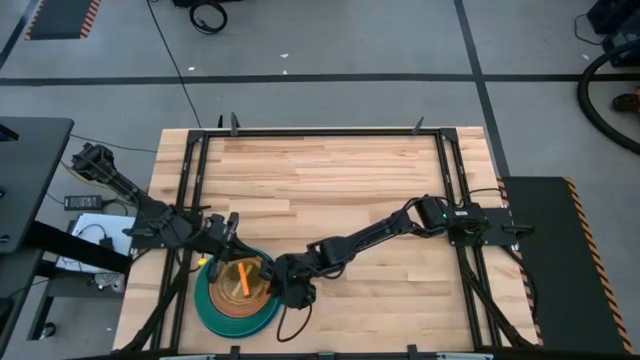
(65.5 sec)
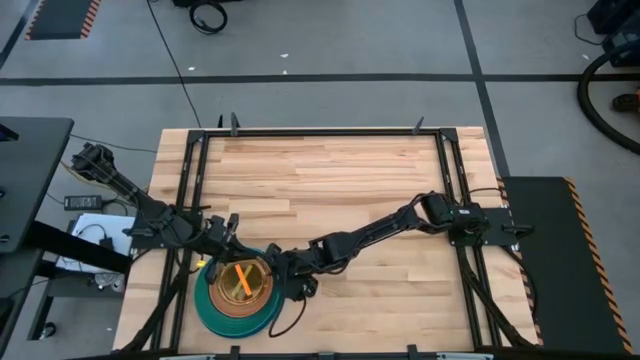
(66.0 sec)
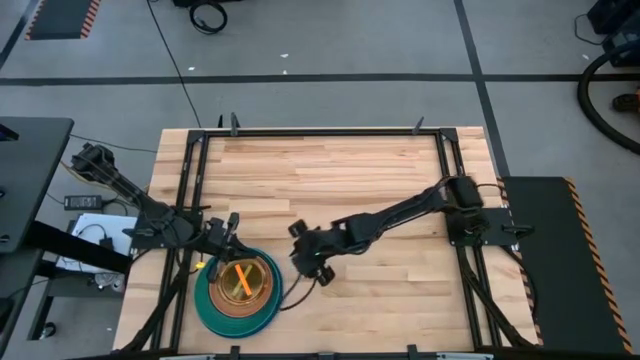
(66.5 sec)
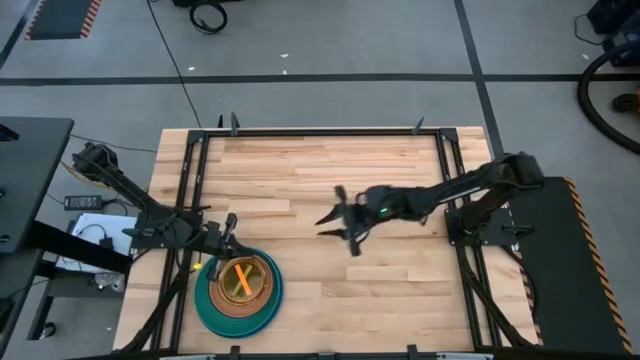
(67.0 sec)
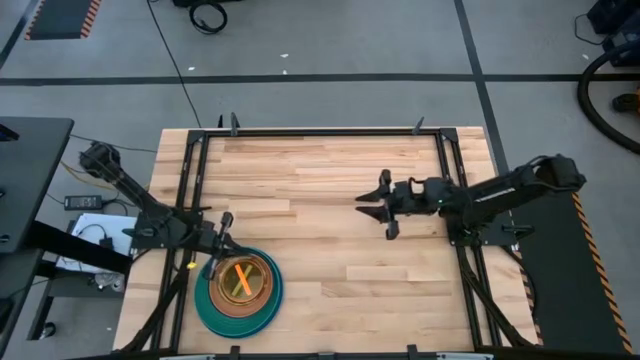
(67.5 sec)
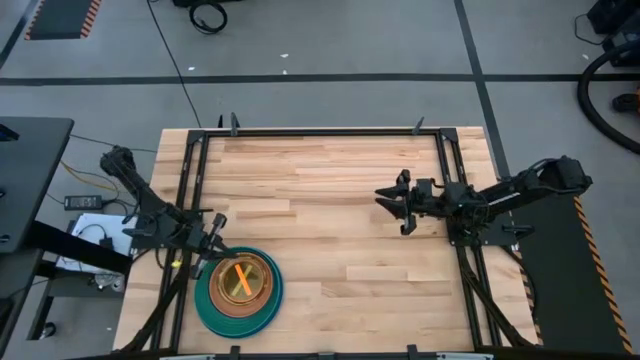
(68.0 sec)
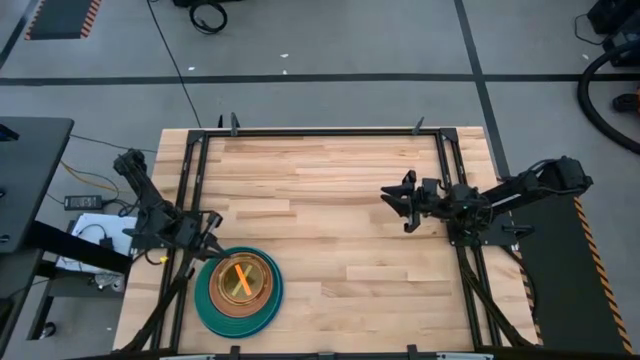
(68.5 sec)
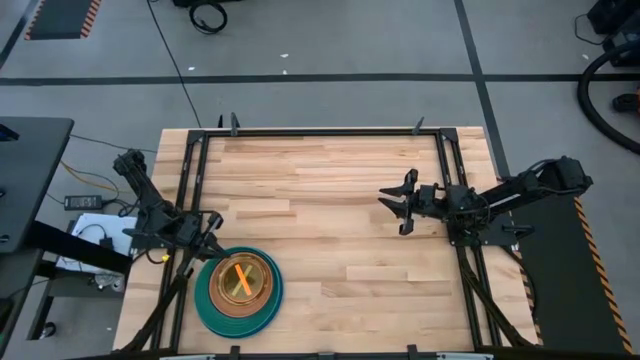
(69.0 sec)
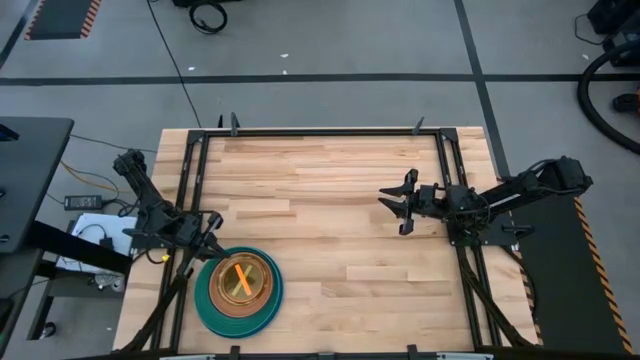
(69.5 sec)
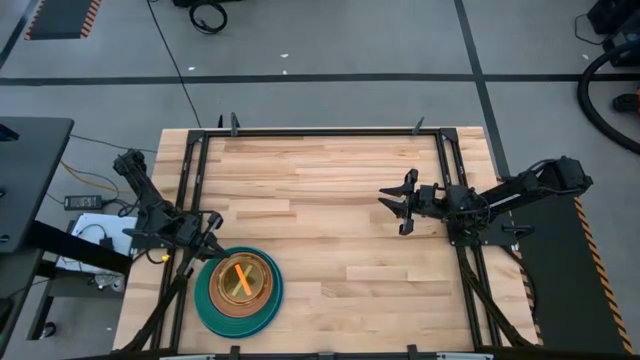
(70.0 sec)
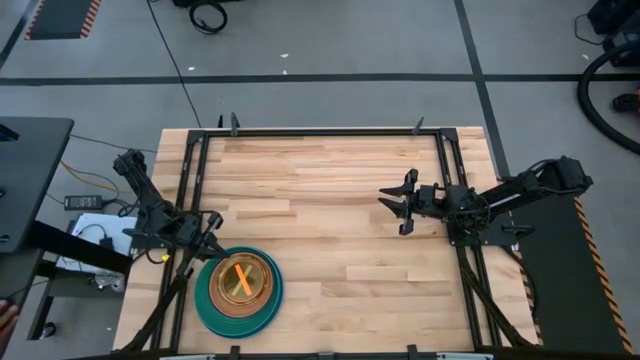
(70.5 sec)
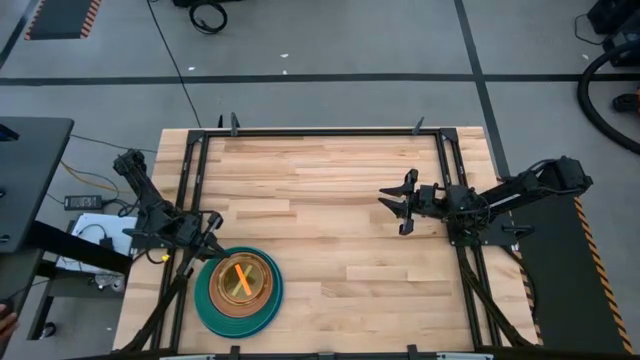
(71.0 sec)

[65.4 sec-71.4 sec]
Task: Stack plastic plates
Return to Home Position

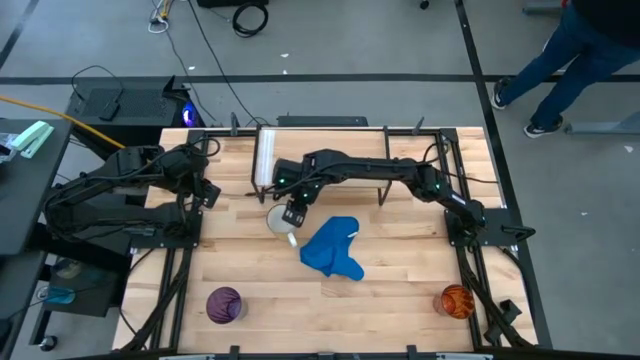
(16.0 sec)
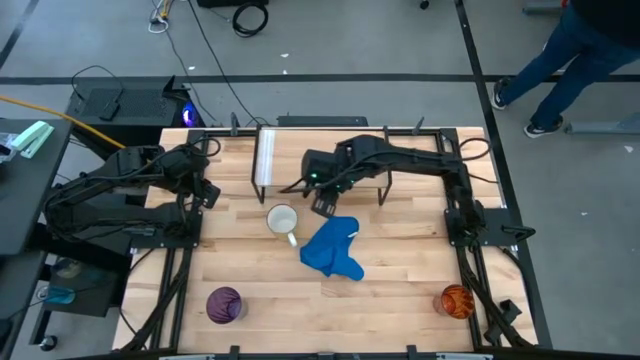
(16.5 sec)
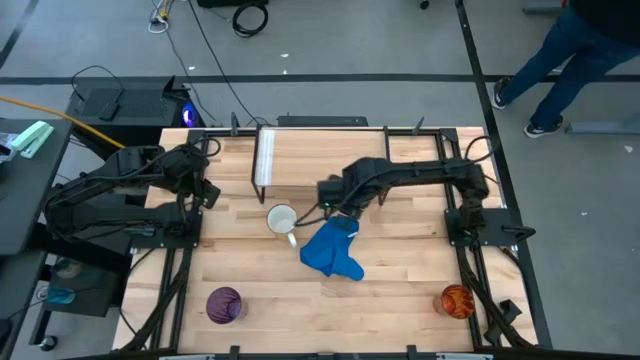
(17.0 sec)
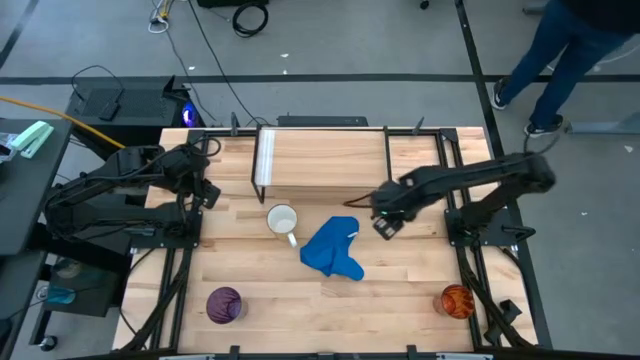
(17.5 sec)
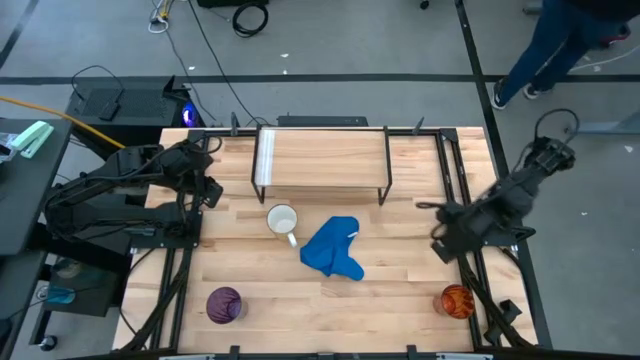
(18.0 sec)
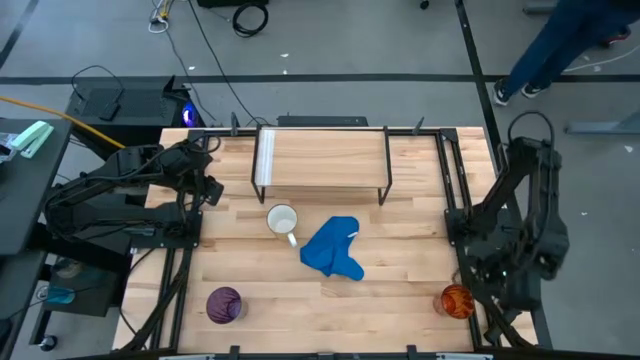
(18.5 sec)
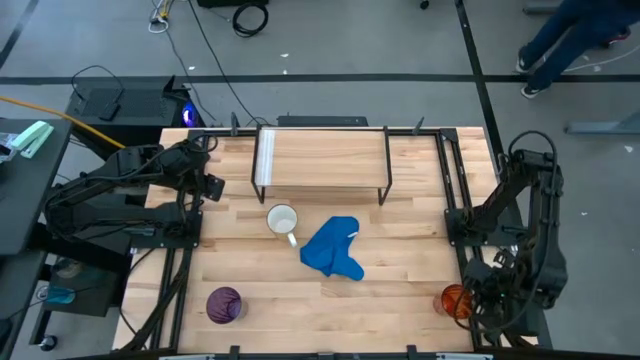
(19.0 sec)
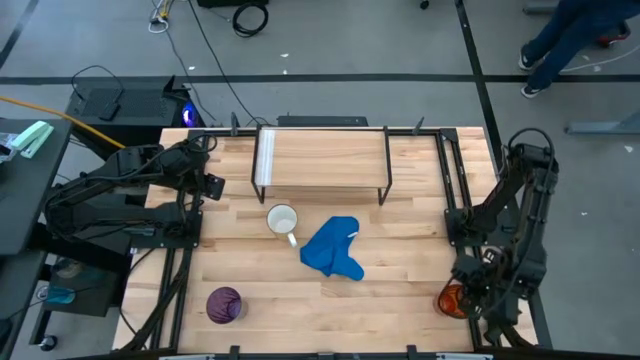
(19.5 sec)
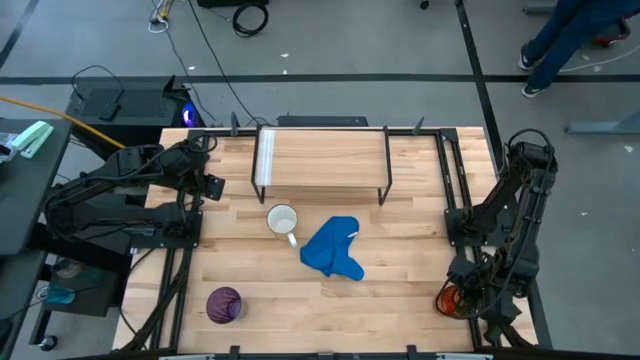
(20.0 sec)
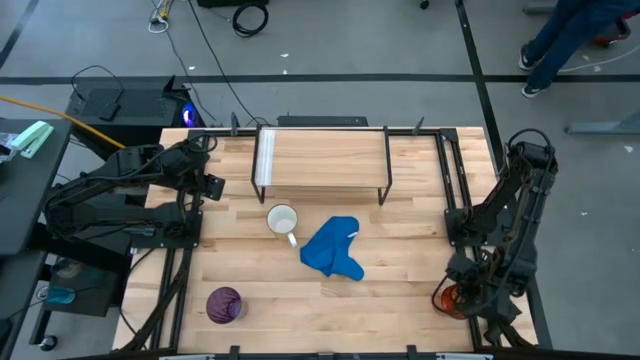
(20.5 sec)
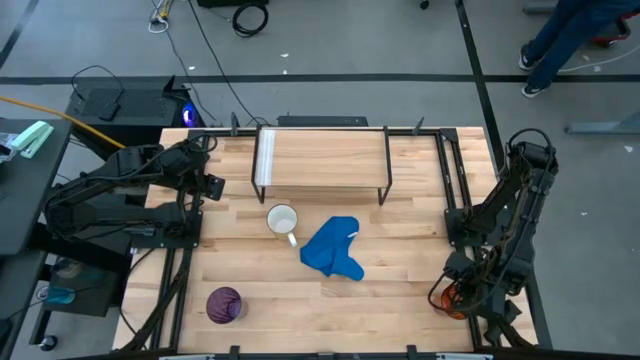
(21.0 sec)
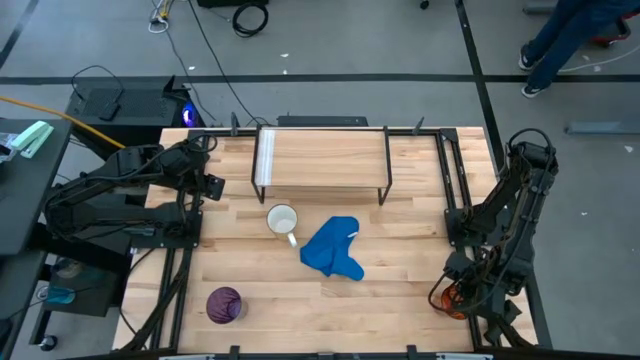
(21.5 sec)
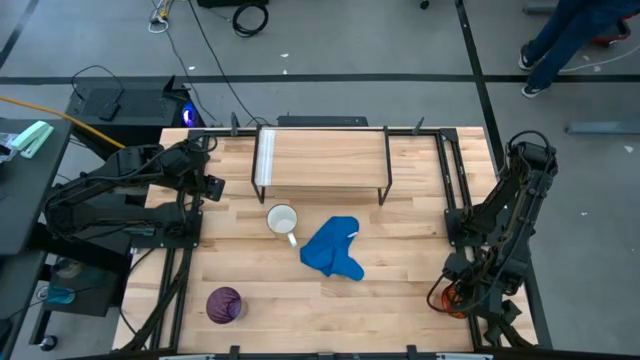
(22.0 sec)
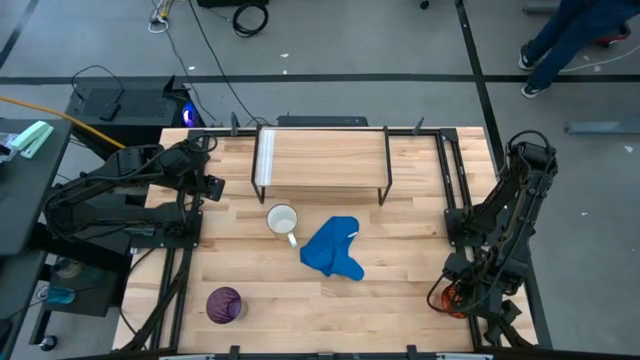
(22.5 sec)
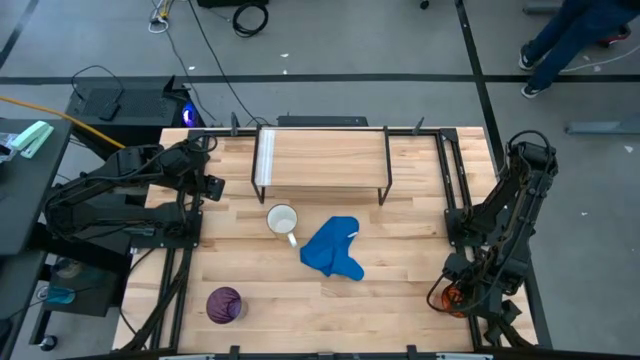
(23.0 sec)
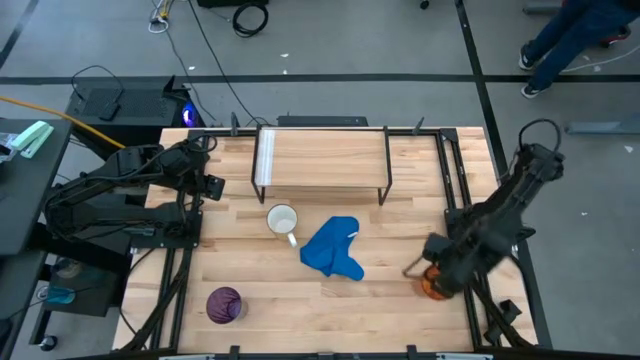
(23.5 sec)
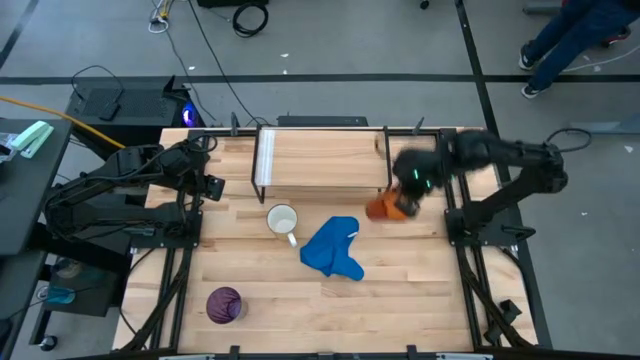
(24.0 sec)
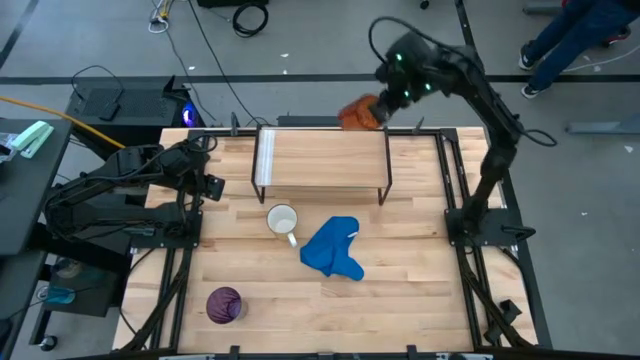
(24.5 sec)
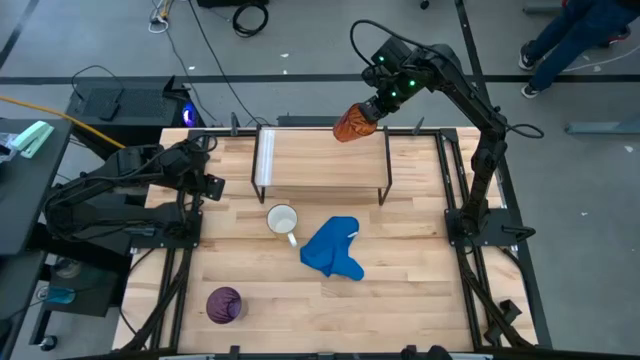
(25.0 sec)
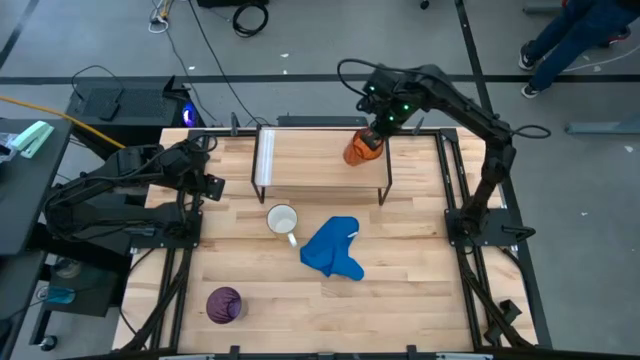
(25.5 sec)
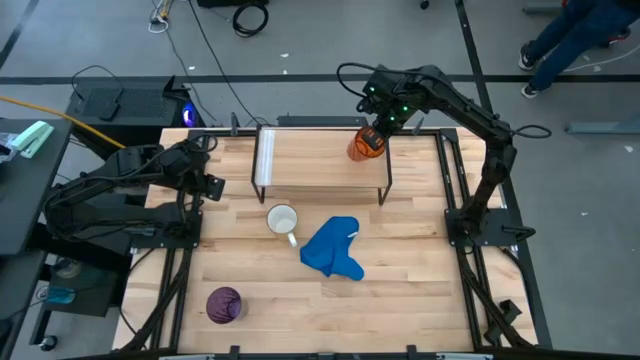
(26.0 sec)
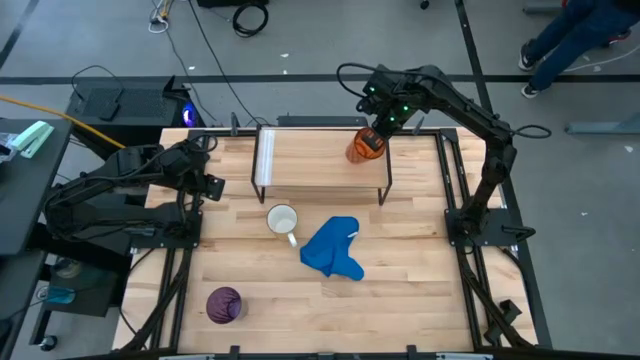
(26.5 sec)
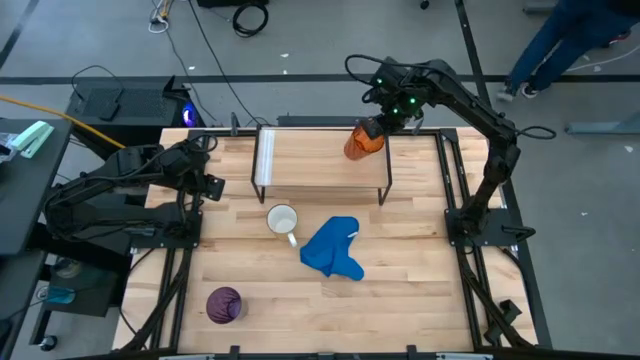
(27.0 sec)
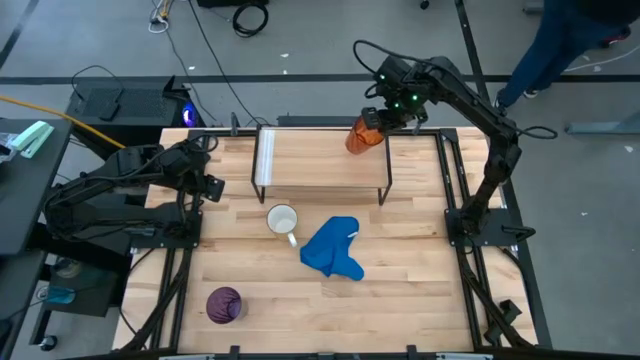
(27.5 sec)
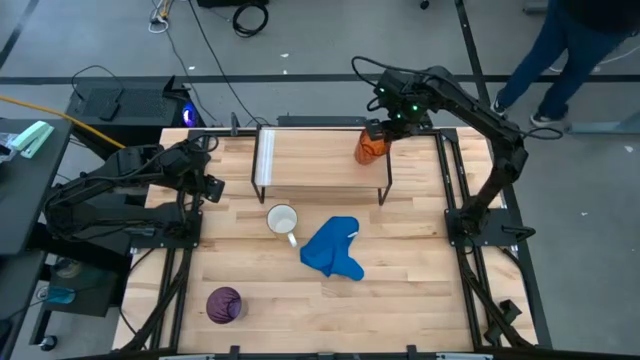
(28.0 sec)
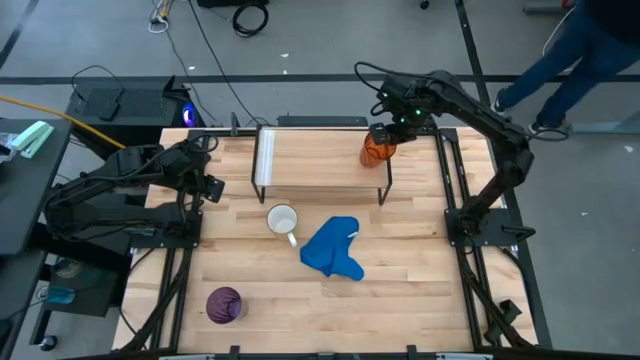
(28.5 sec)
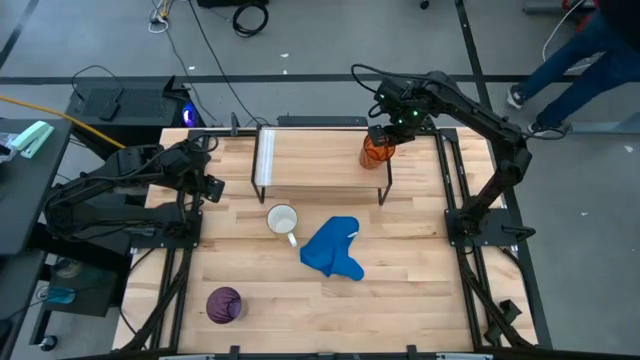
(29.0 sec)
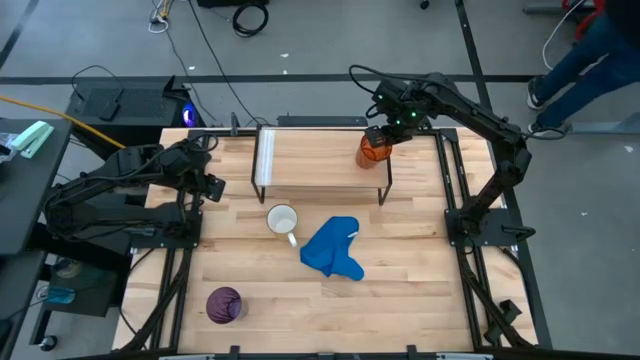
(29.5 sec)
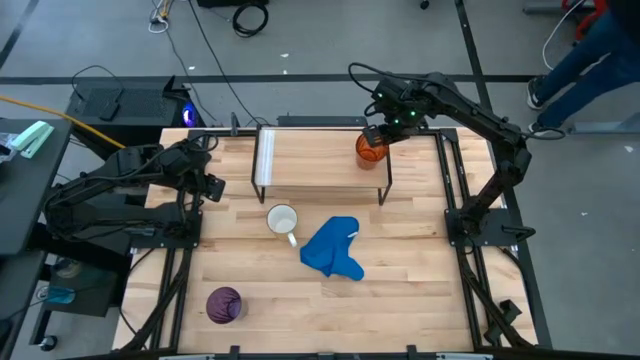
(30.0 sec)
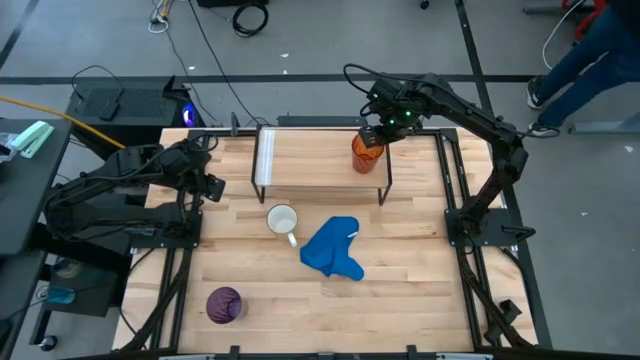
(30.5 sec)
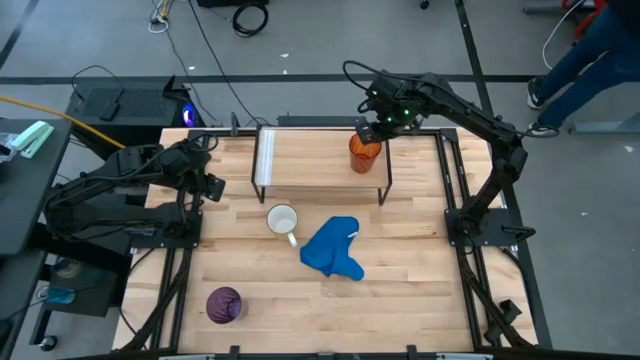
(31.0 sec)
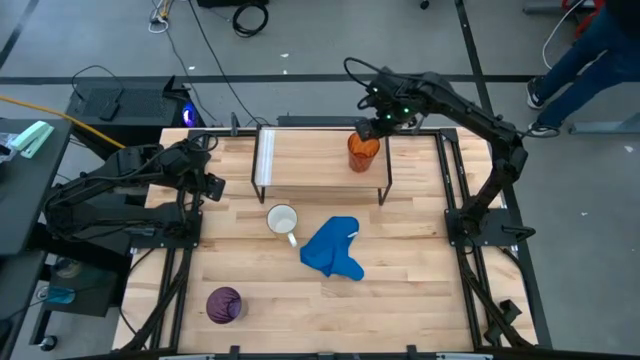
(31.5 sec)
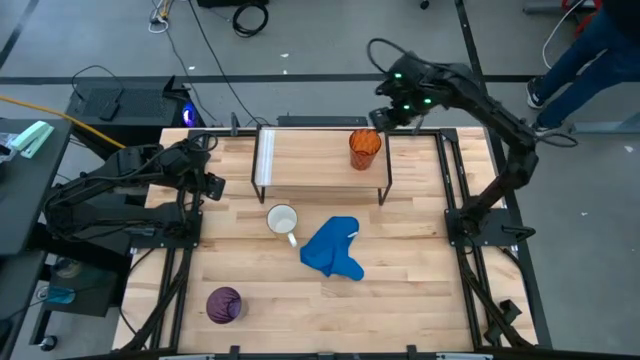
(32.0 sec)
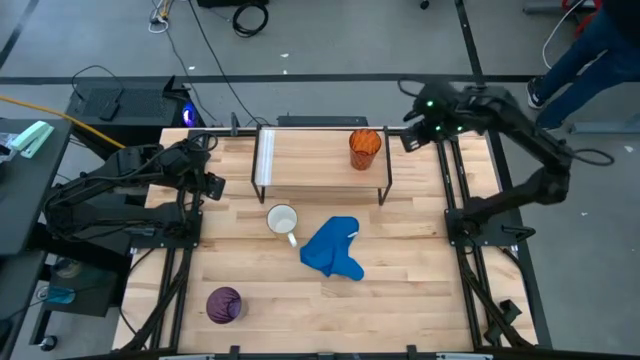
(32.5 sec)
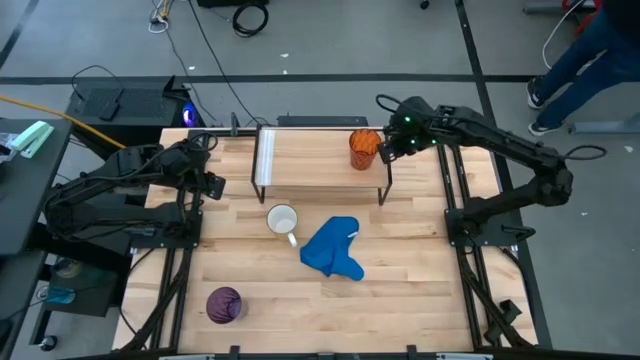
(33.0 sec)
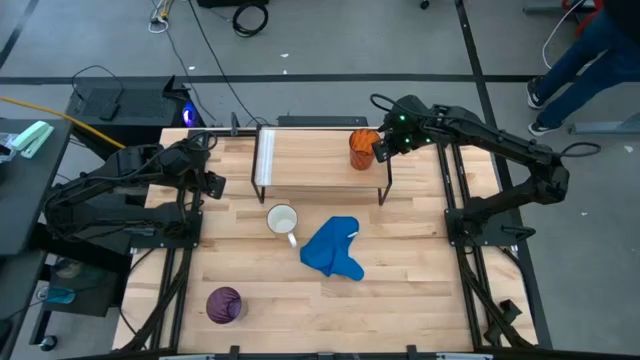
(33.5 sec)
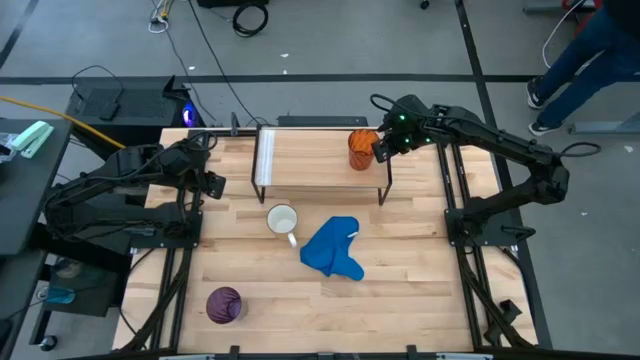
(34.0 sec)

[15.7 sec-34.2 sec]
Task: Stack small to large cups/mugs on shelf
Put the orange cup on the shelf
